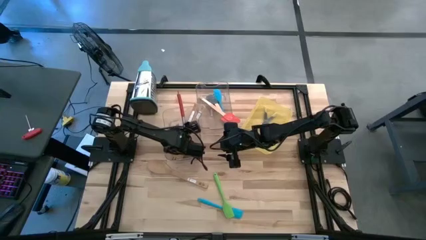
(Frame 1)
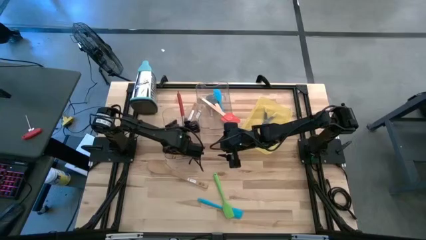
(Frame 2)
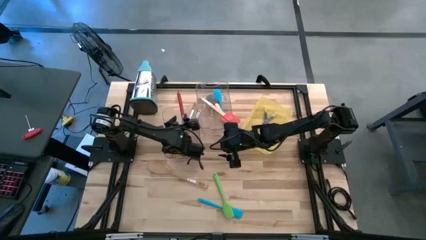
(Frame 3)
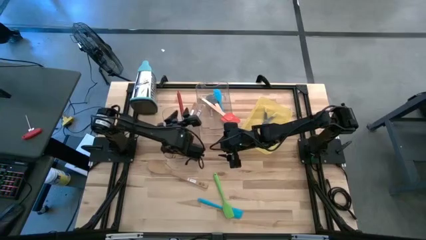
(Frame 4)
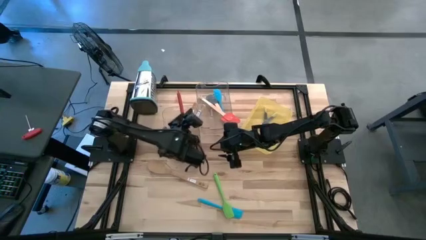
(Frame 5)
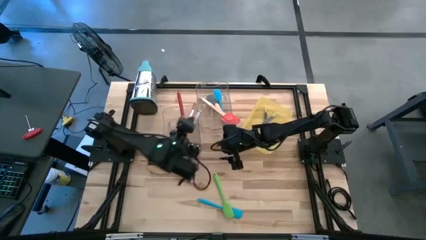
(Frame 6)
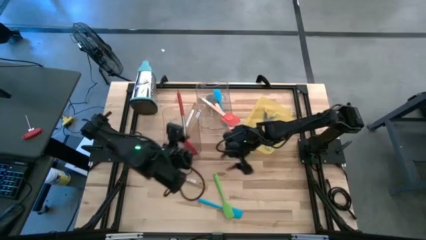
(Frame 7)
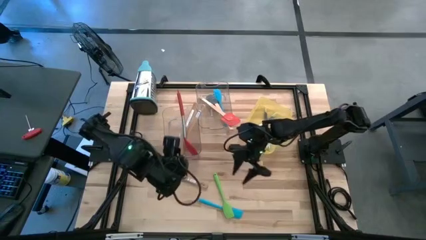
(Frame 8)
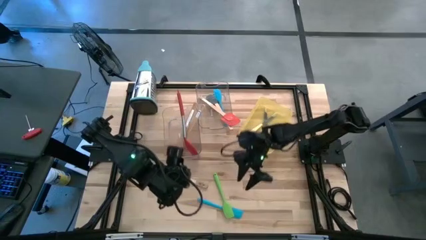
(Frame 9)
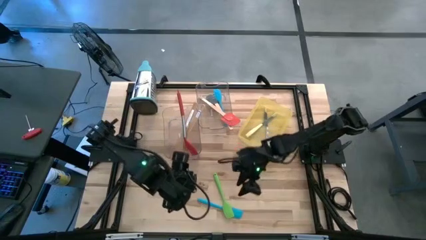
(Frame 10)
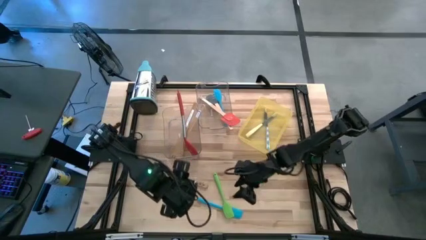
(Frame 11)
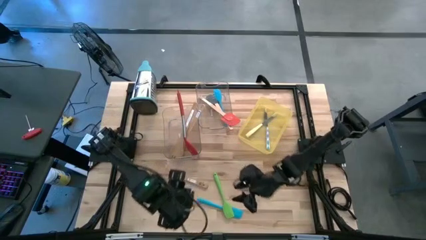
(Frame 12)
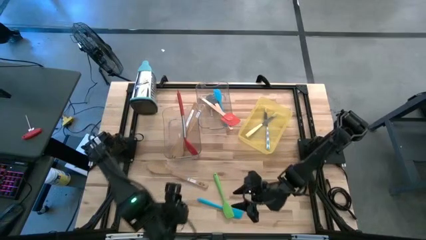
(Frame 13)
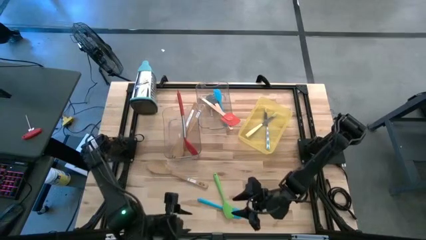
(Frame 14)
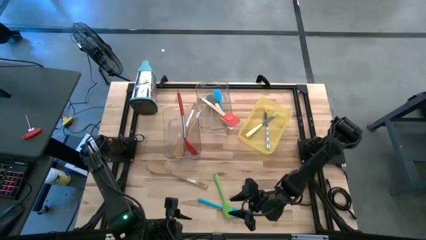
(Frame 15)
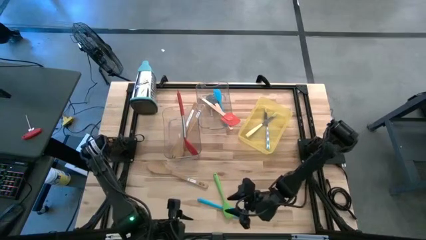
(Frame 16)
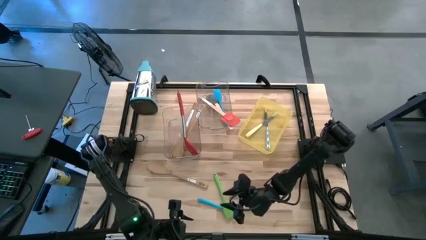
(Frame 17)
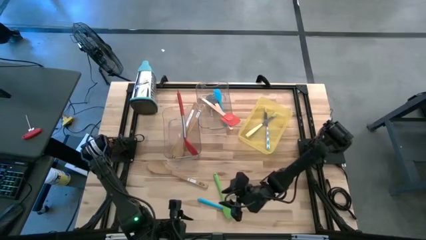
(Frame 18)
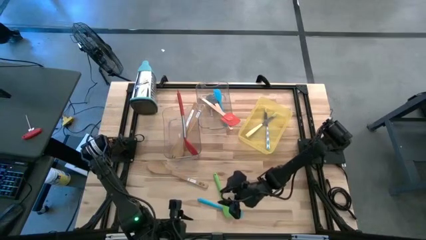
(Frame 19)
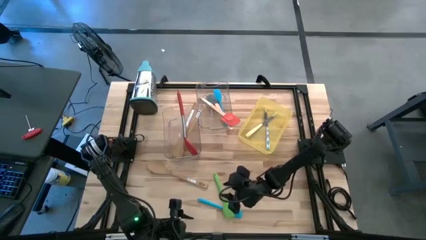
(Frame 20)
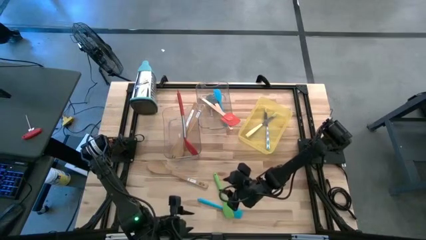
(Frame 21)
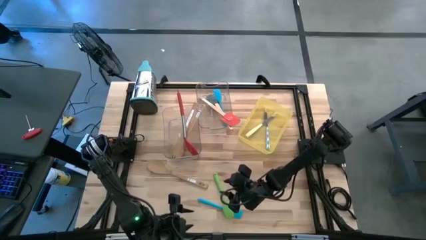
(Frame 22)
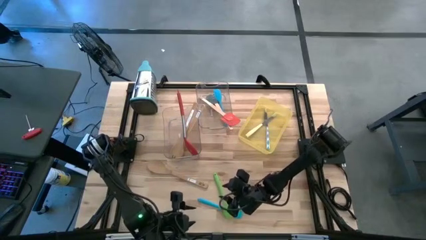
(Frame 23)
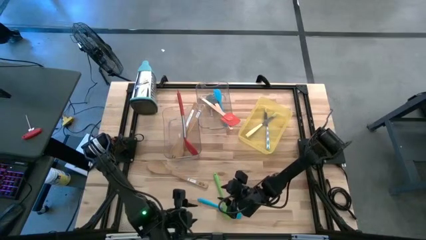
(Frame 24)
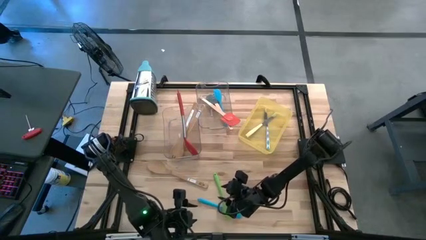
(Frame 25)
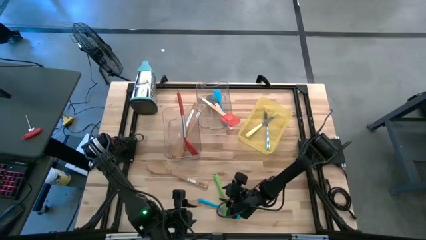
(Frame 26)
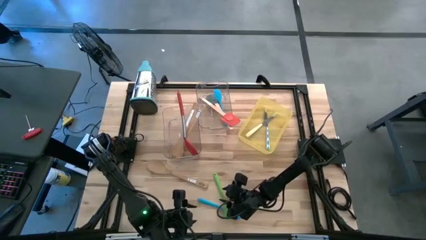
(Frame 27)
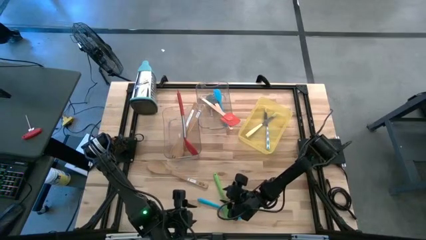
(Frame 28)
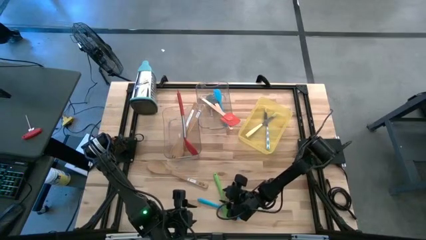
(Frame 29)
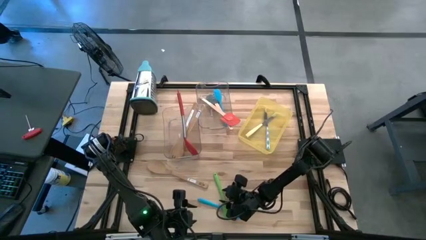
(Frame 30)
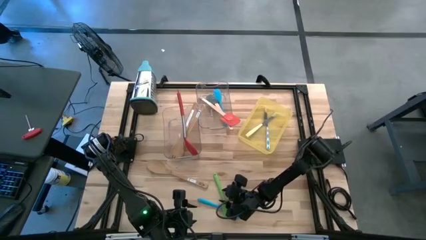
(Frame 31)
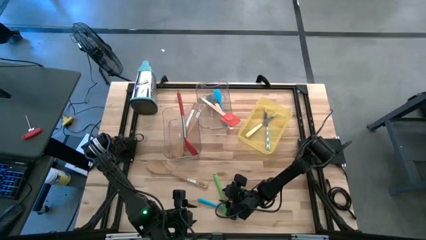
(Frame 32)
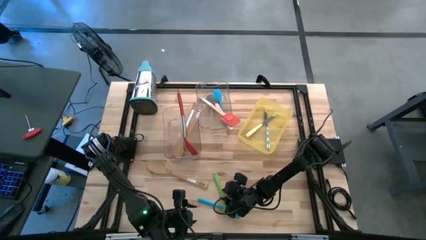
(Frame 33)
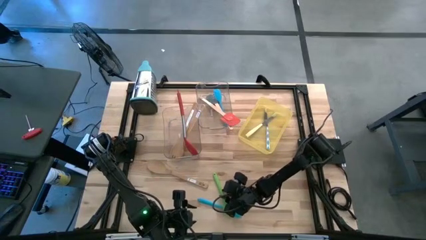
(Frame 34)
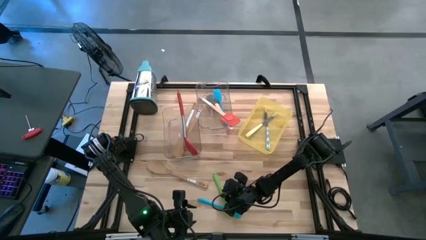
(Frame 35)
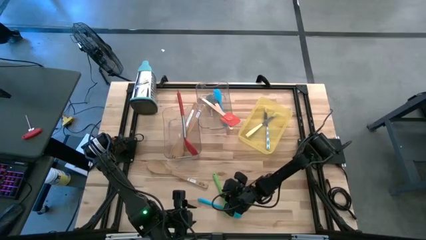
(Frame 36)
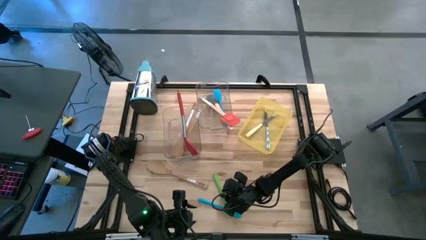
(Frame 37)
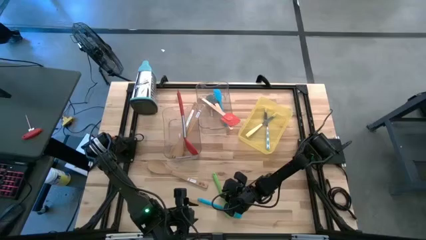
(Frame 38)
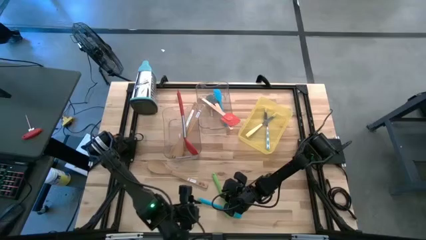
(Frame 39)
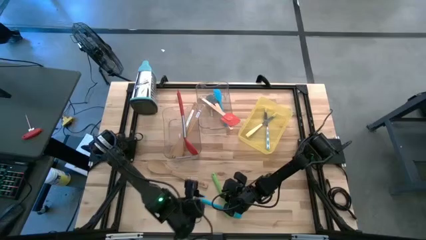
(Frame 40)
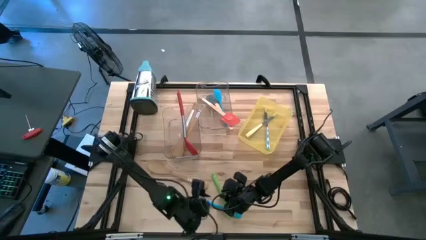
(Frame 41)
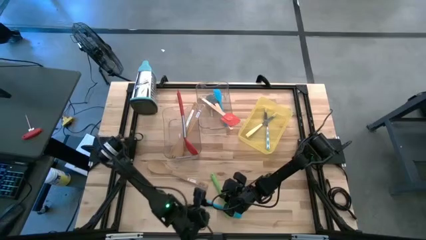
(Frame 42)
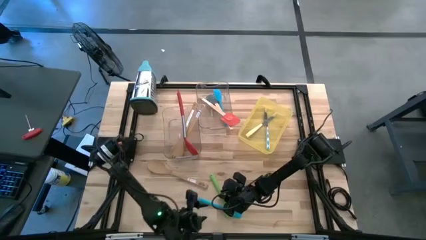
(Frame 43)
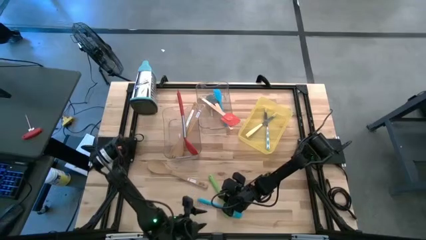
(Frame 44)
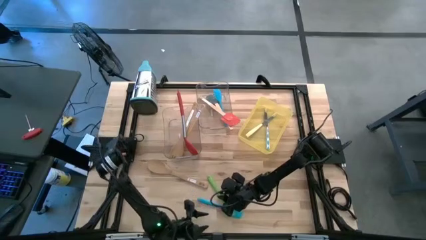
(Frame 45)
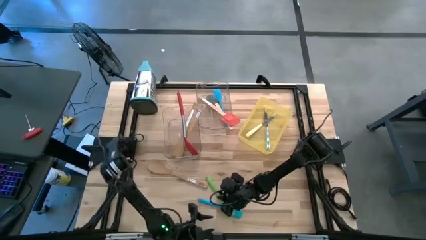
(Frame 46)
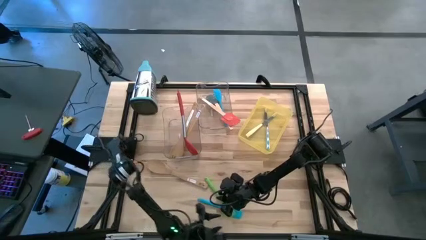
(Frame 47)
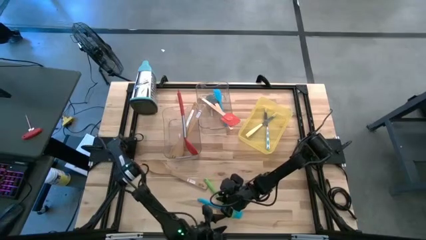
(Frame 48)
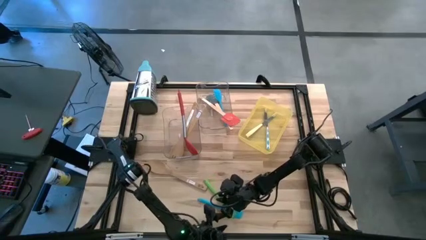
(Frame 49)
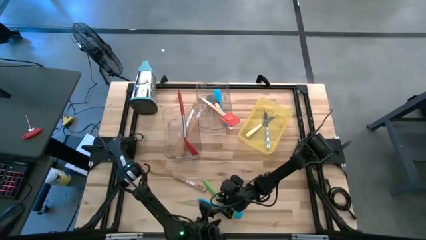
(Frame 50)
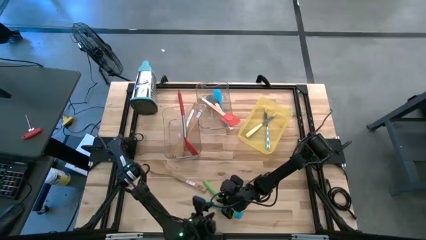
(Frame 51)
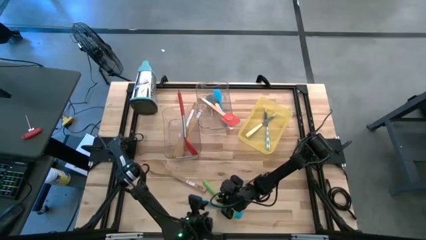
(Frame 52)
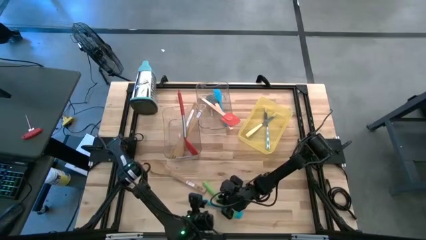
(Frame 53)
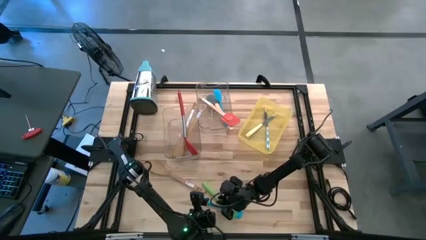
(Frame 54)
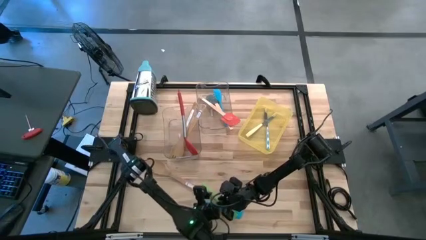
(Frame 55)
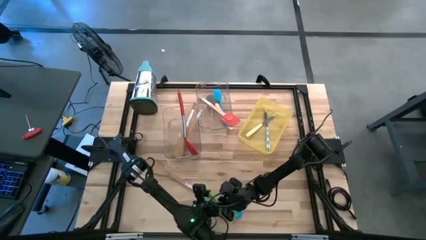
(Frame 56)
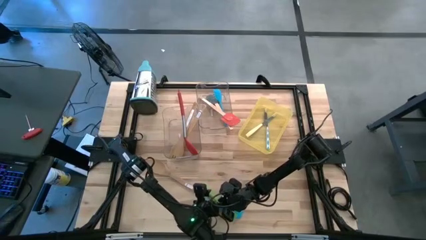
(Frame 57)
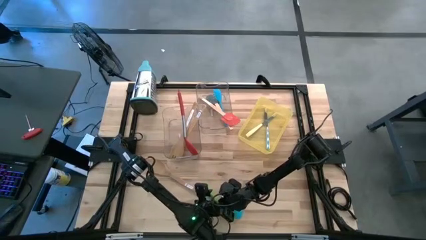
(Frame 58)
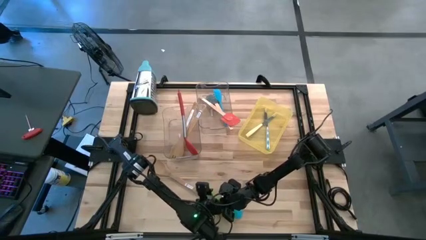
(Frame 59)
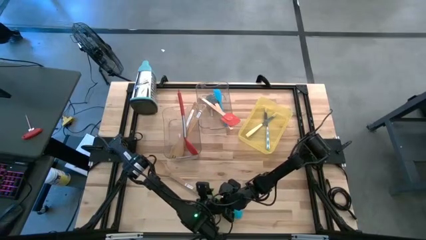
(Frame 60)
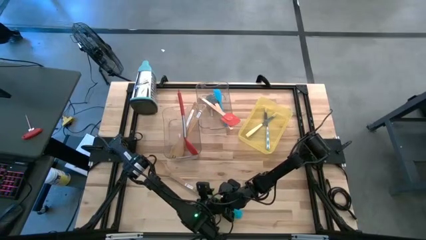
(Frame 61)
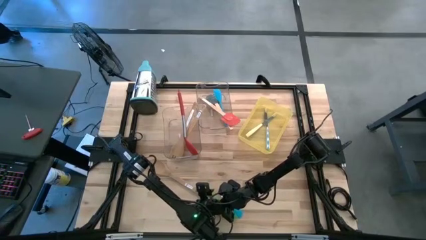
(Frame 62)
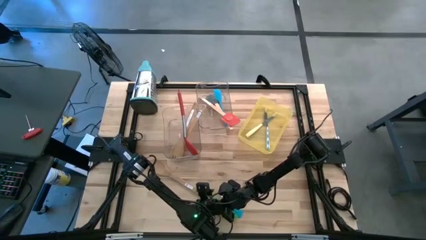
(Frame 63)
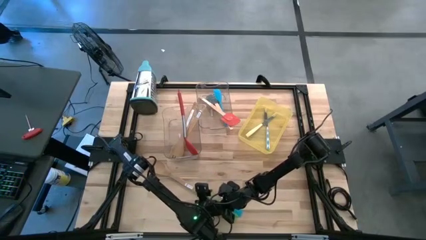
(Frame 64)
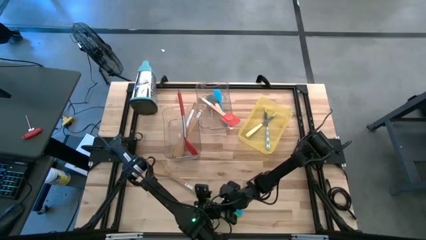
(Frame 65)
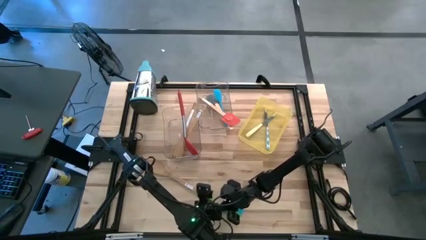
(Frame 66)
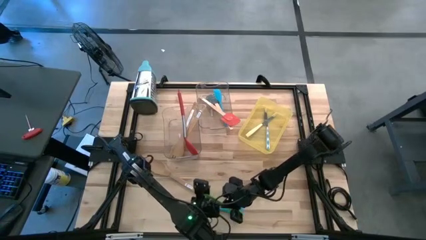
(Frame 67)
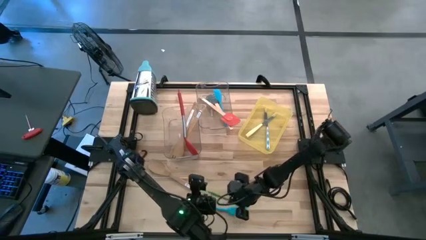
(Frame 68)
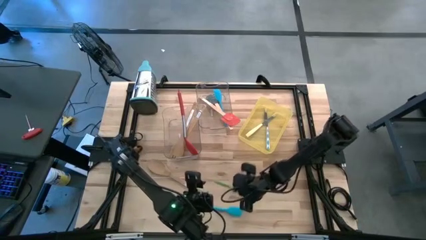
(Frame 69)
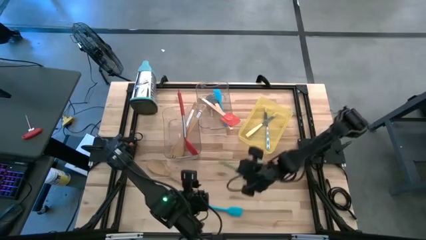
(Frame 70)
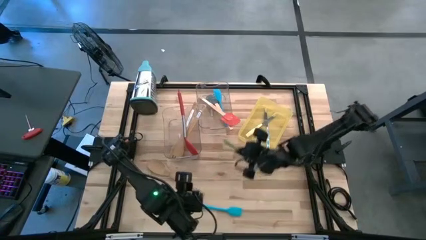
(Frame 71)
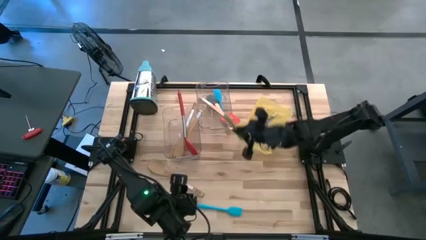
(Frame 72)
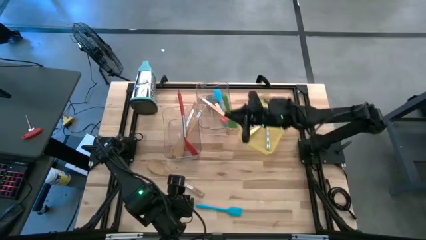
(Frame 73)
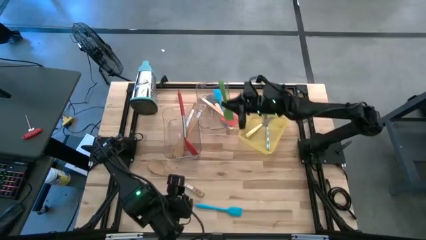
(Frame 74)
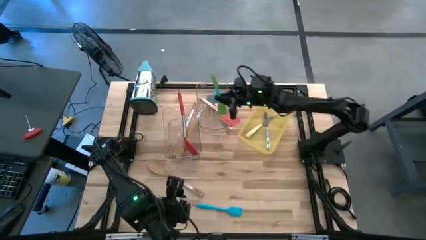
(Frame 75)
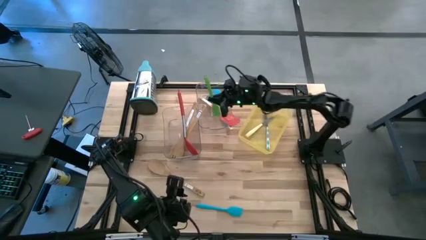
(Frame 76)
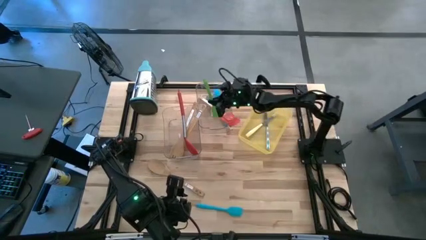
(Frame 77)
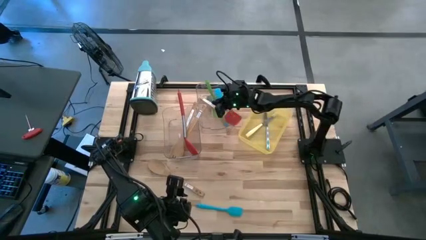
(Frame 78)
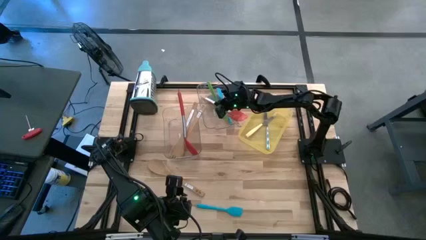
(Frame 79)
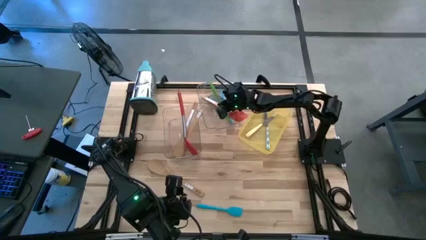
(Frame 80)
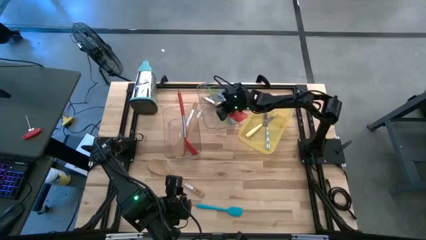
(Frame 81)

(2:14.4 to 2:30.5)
Task: Pick & Place Kitchen Items
Put the green spatula into the top right transparent bin

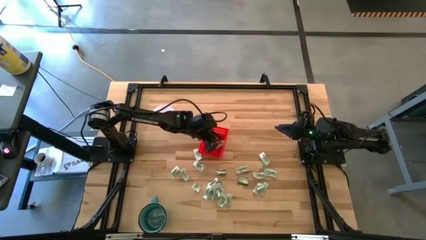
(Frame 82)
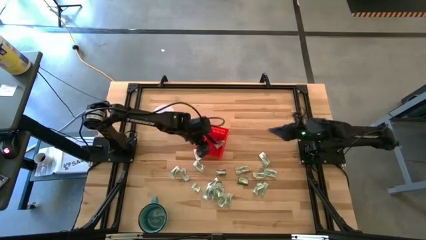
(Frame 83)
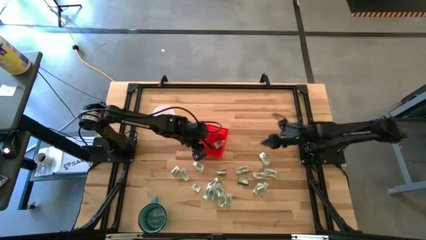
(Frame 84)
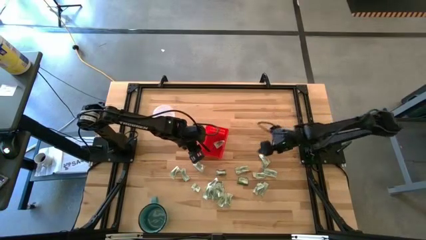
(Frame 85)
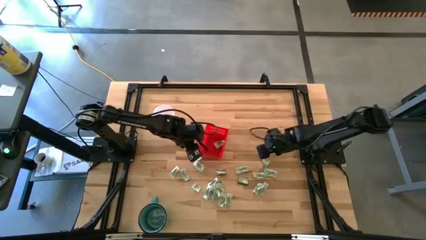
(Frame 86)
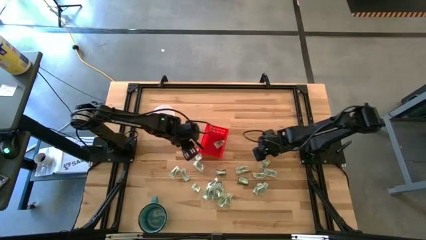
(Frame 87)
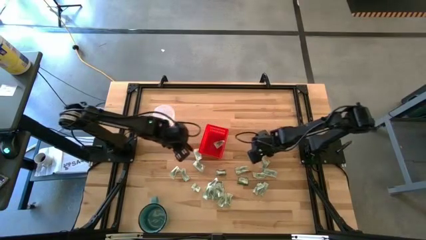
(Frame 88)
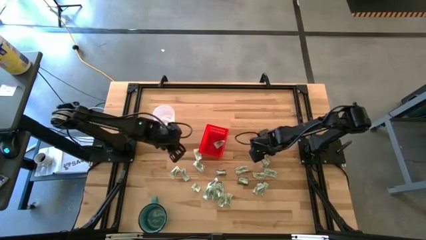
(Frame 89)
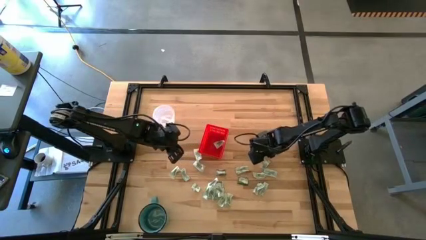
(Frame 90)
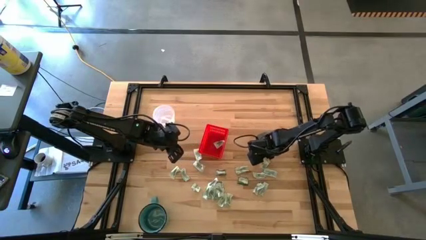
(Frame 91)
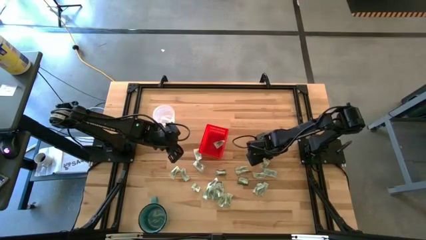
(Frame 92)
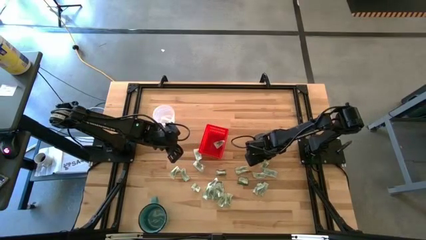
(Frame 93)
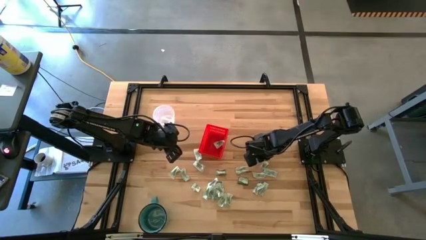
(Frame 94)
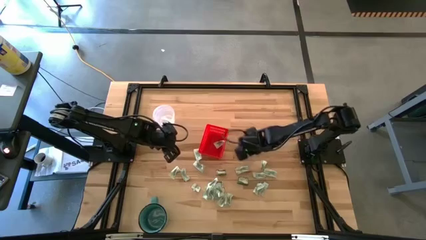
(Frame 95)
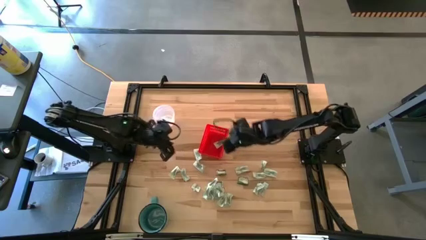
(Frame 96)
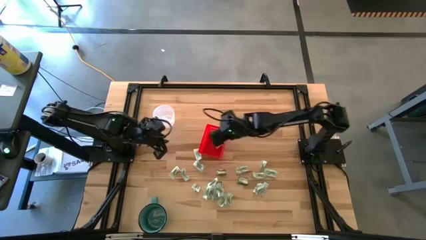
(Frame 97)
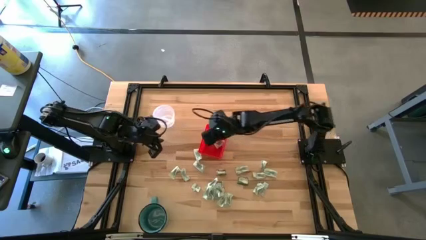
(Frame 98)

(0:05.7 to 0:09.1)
Task: Pick and place Stevia / Truvia into bins
Put the stevia packet into the red basket
